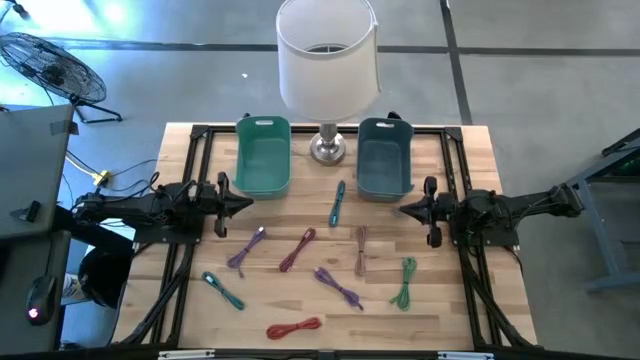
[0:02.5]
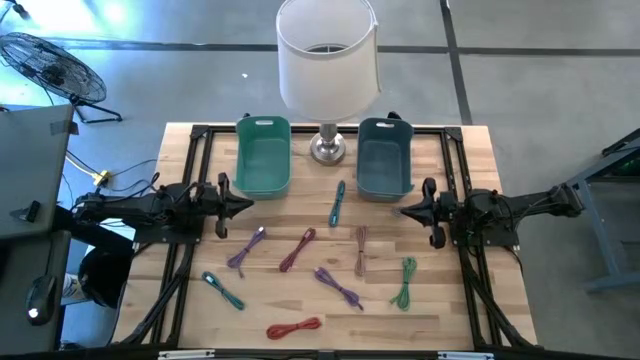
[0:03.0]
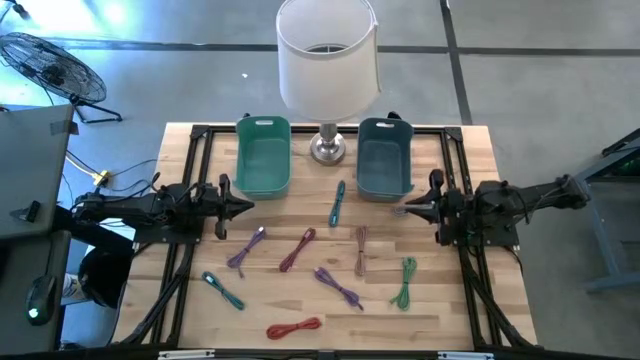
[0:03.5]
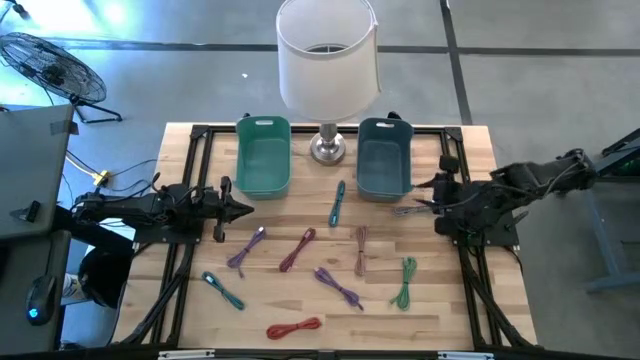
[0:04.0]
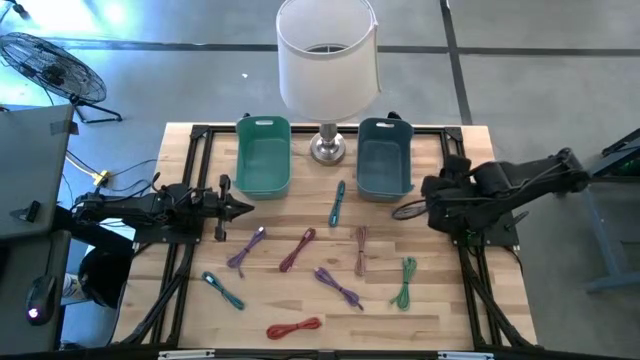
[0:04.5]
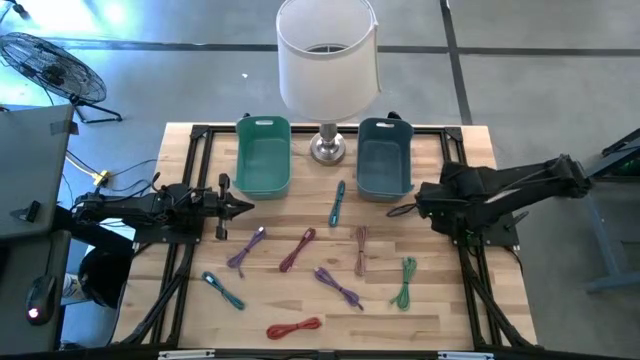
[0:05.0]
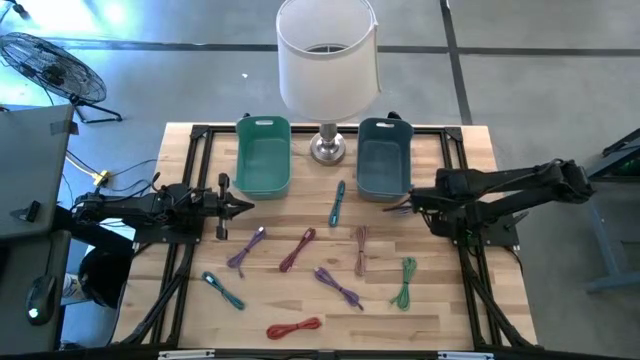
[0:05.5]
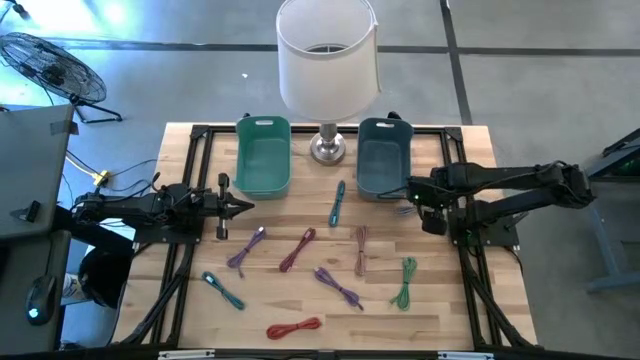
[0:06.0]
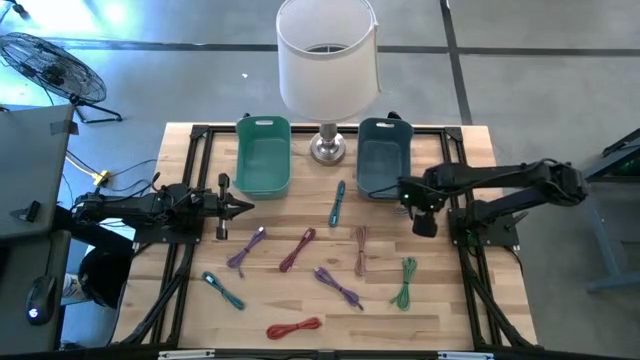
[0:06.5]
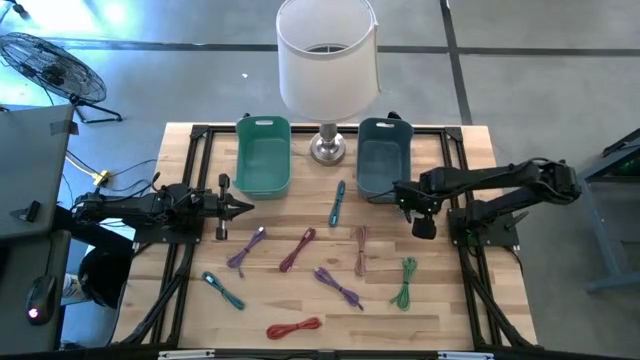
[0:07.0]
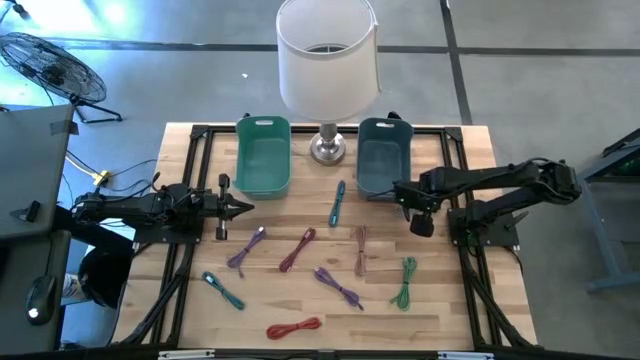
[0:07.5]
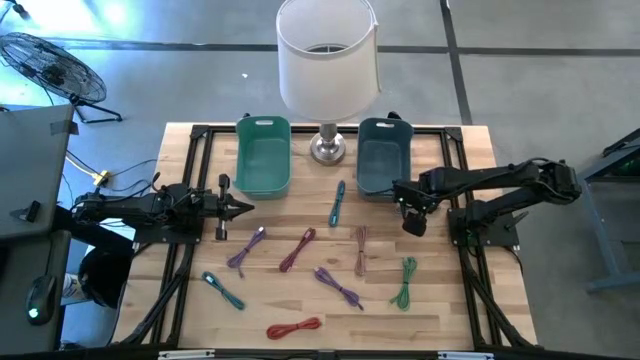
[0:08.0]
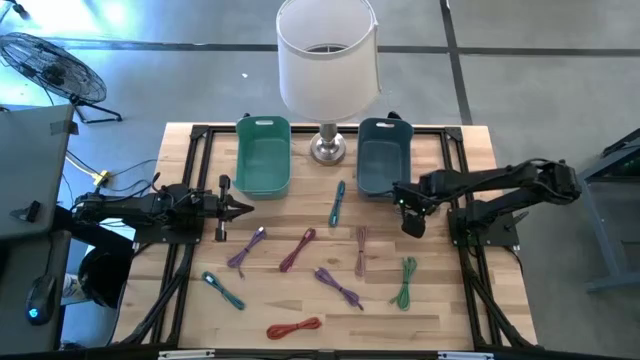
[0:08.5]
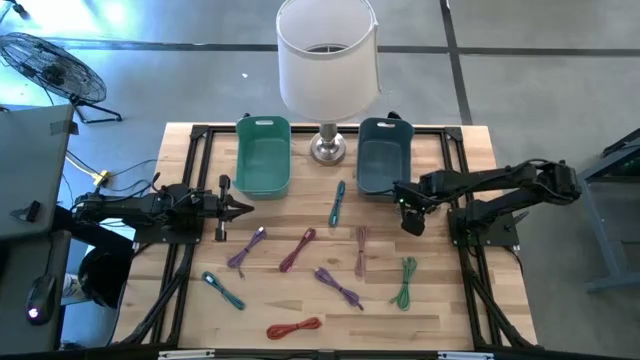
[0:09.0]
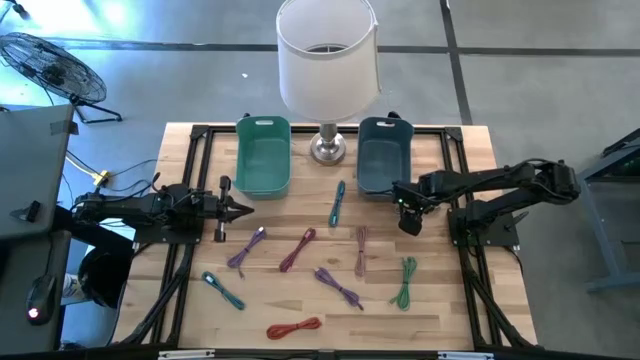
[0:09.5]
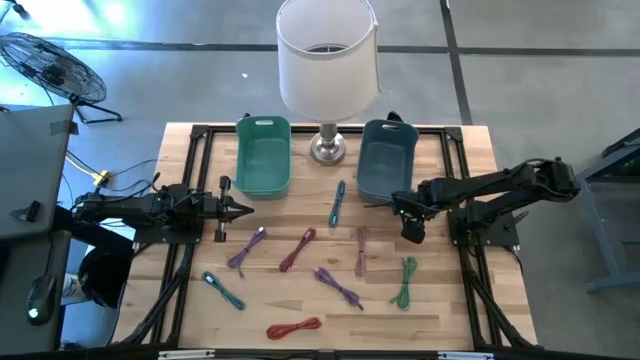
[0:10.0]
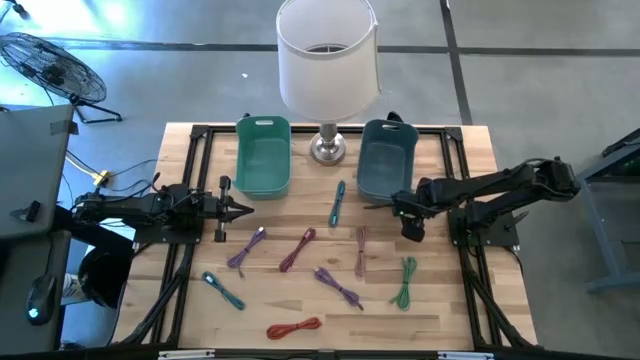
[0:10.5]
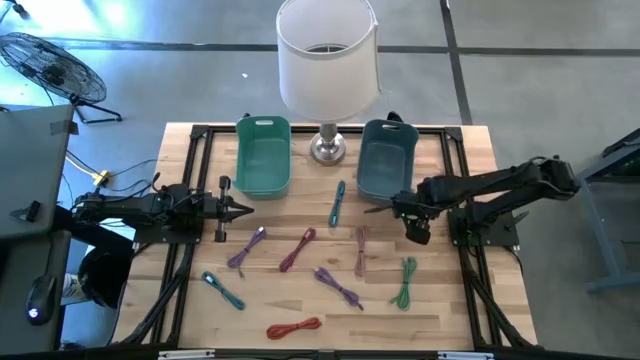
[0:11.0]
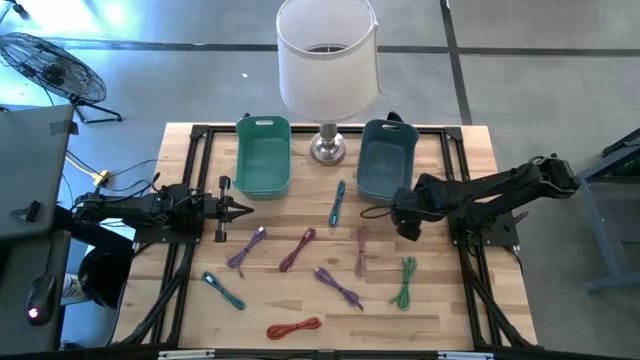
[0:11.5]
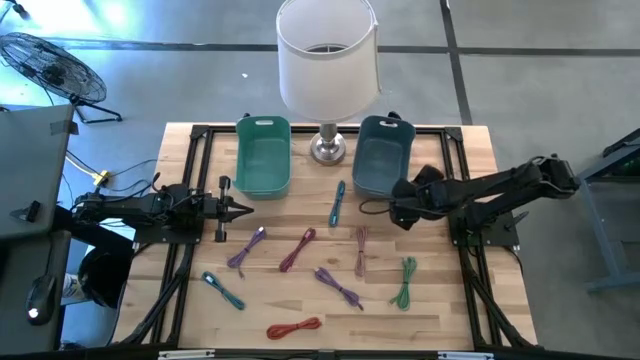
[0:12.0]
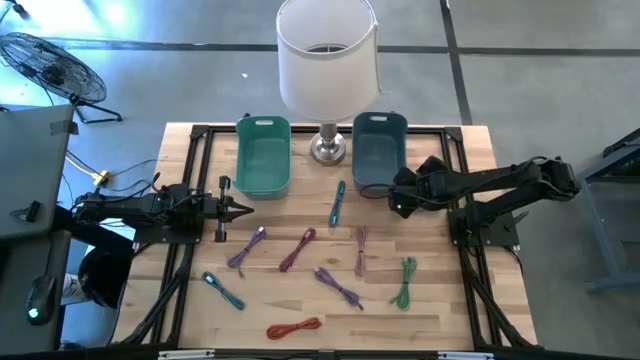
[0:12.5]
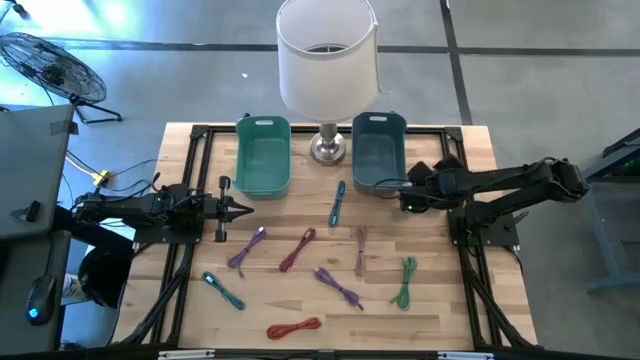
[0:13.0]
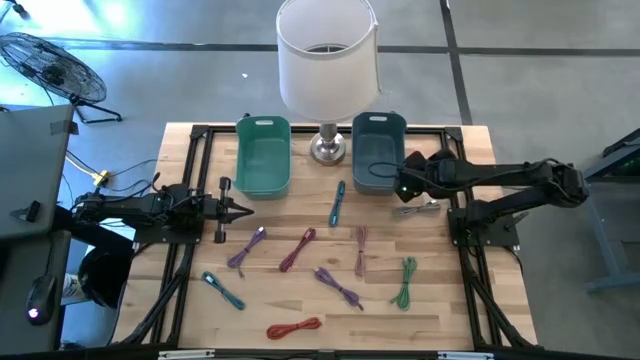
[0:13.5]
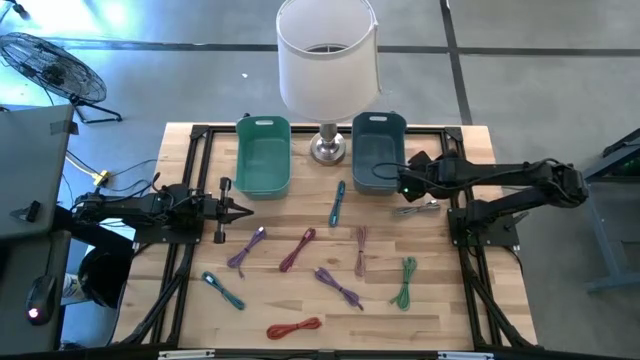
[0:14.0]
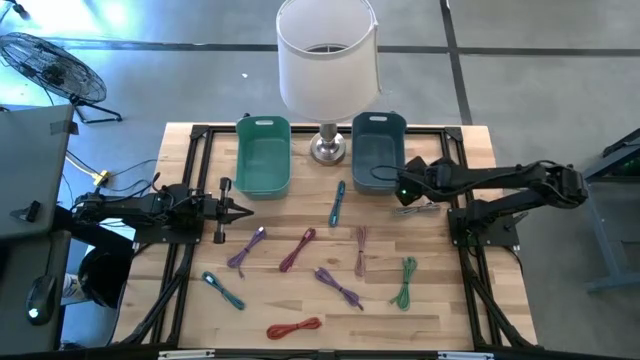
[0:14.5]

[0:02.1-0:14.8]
Task: Pick & Place USB Port
Adjust the blue bin

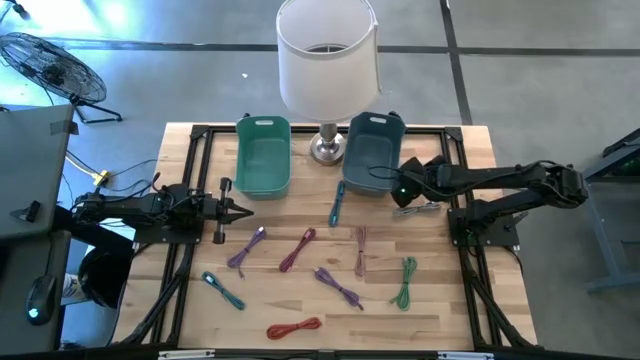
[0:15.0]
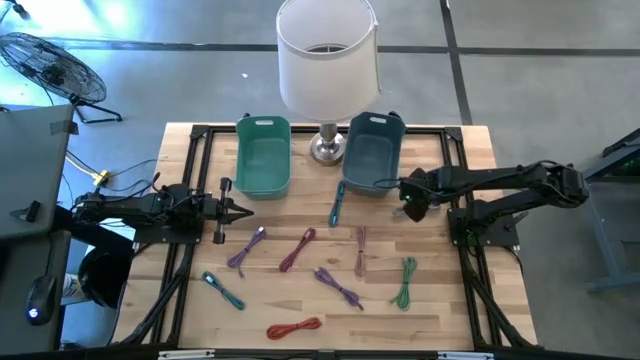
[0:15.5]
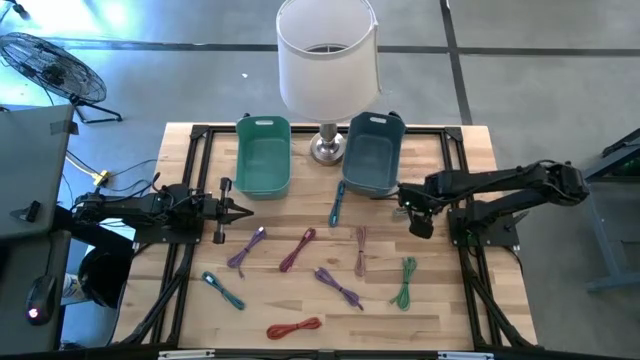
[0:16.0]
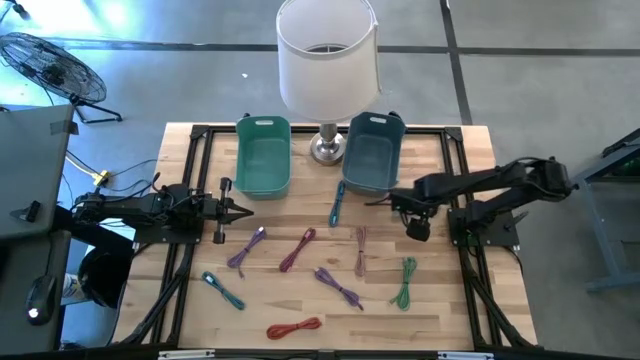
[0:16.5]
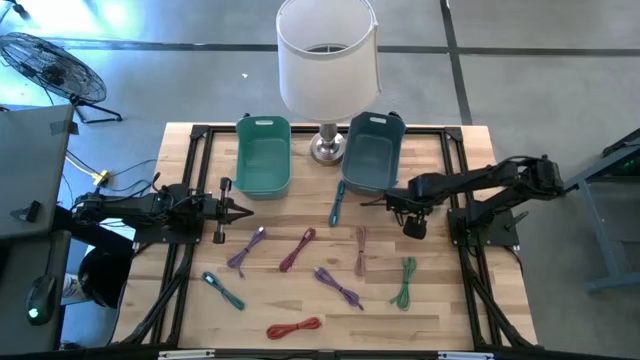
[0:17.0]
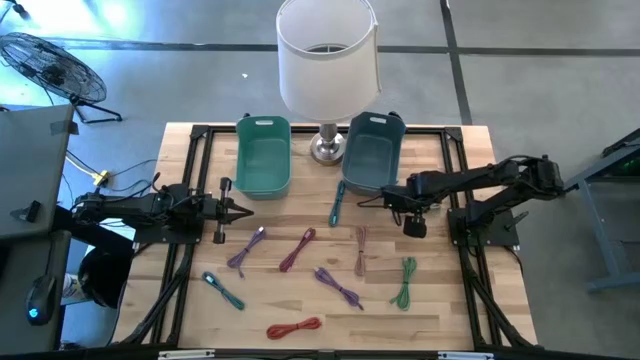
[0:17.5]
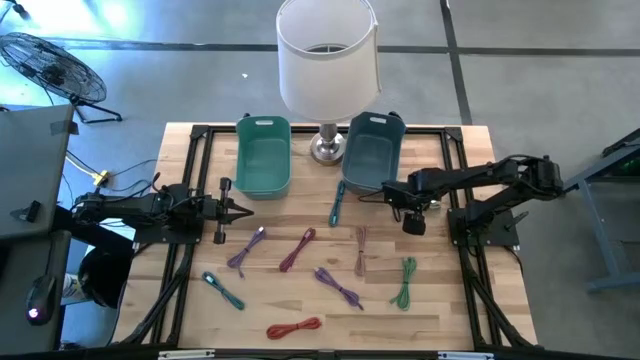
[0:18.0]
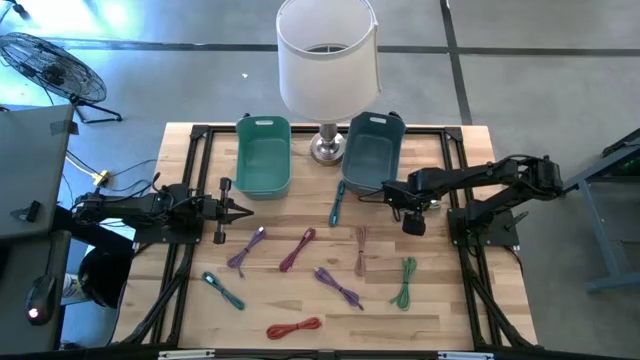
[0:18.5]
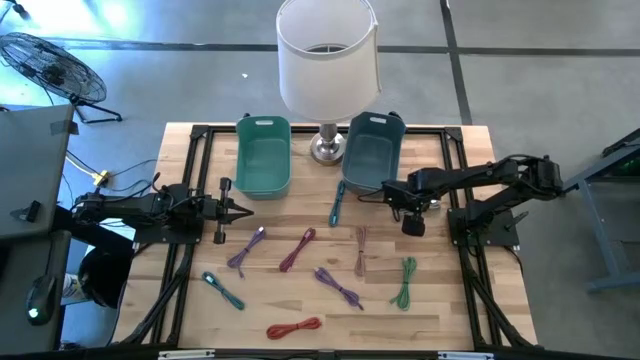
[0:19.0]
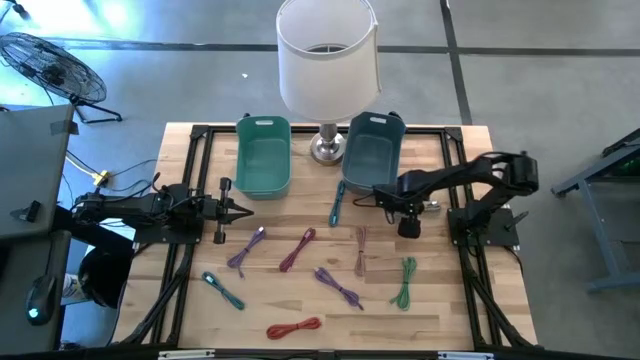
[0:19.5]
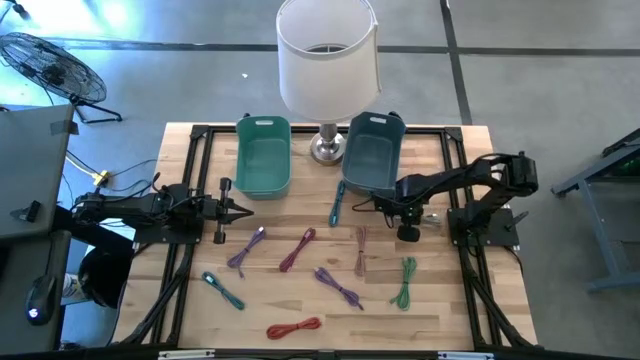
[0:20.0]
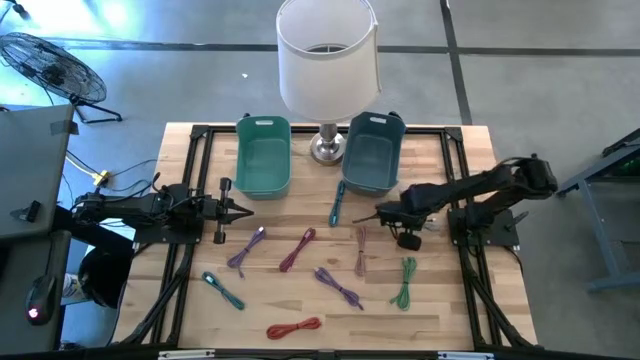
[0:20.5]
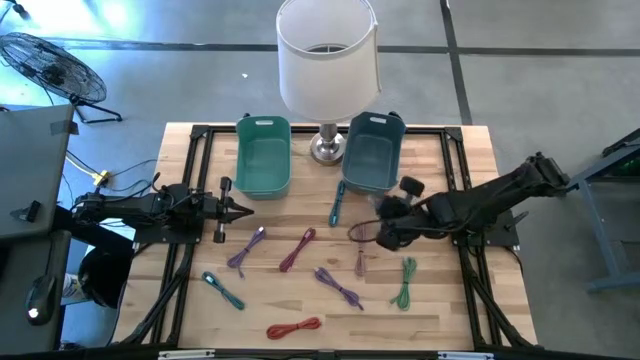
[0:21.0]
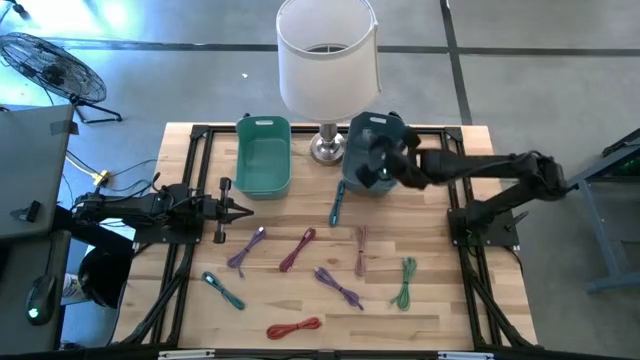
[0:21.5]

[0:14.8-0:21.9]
Put the white patterned charger cable into the blue bin

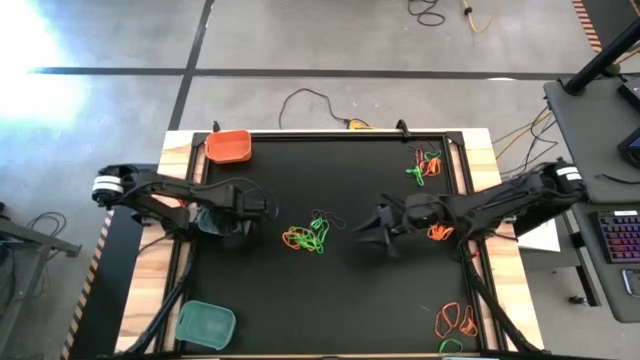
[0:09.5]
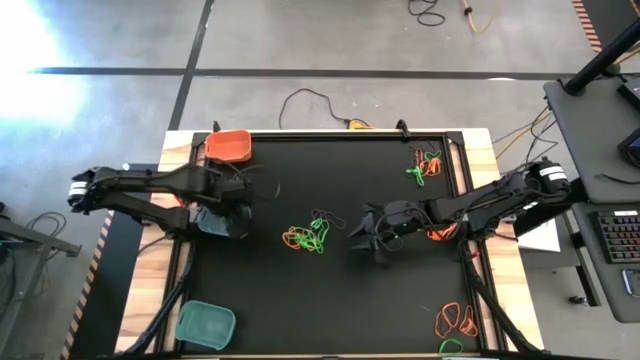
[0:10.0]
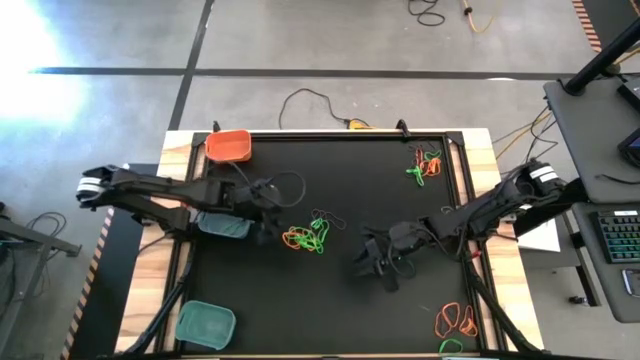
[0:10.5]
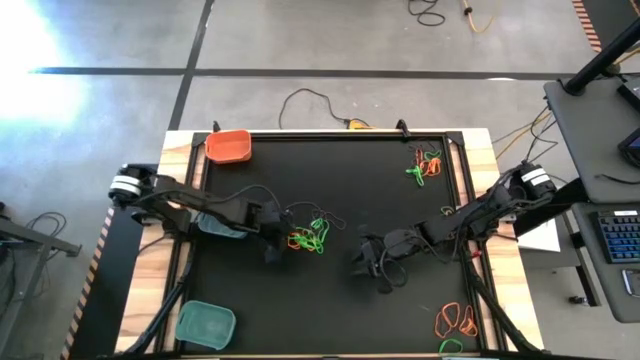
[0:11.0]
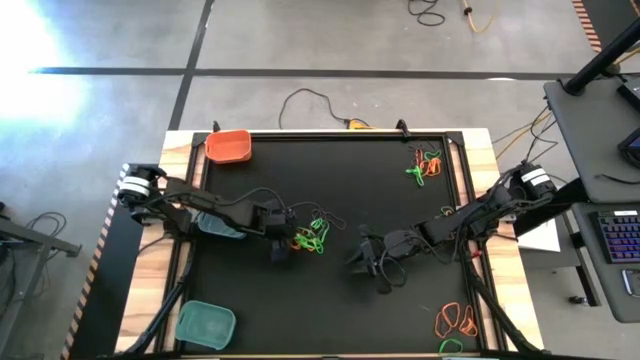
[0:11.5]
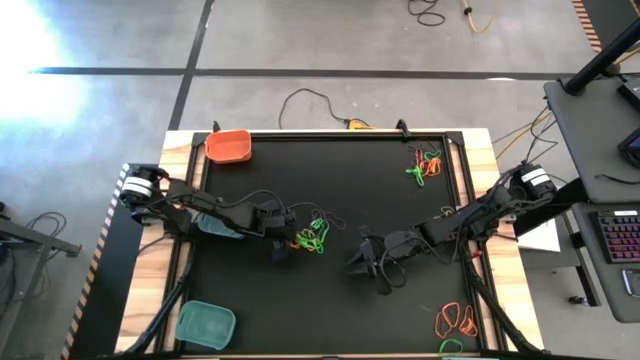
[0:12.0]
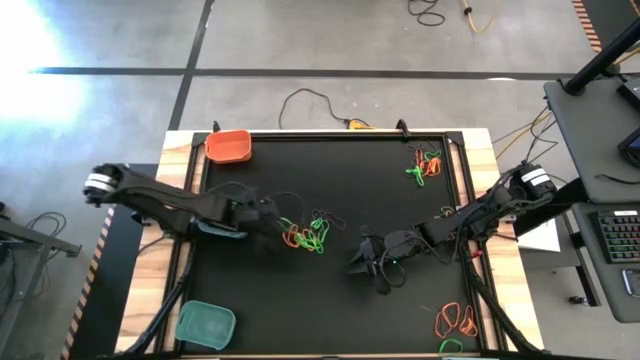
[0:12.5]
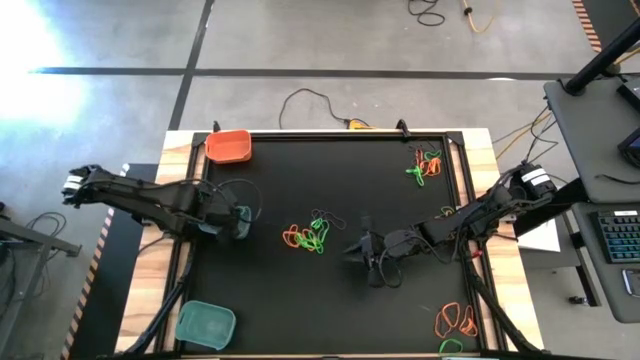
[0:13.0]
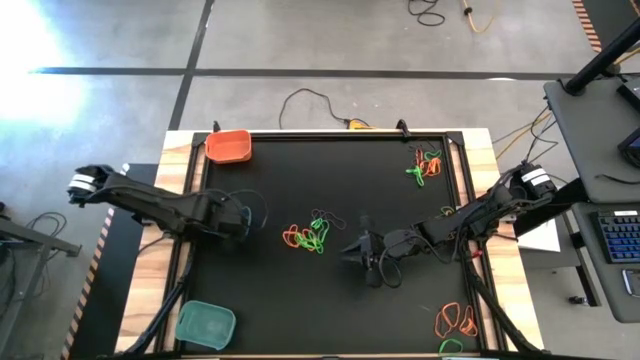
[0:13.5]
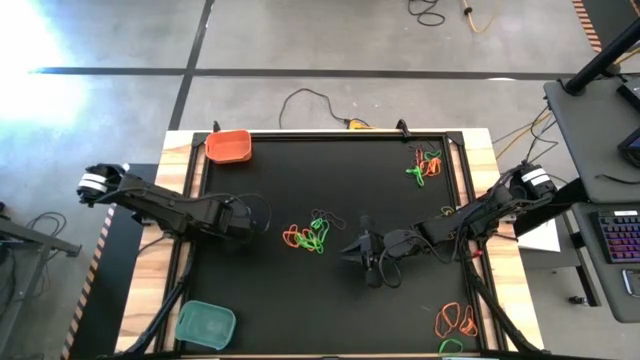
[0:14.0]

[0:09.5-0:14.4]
Task: Sort rubber bands into baskets
Put the green rubber band into the blue bin
